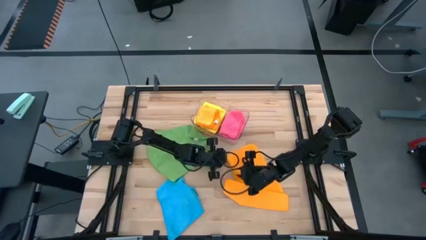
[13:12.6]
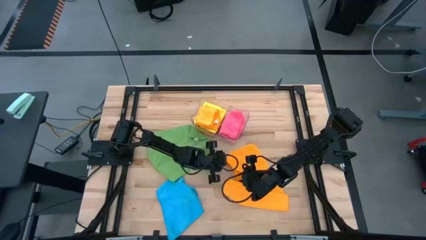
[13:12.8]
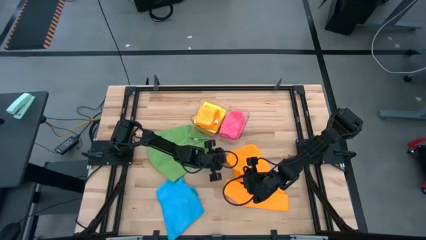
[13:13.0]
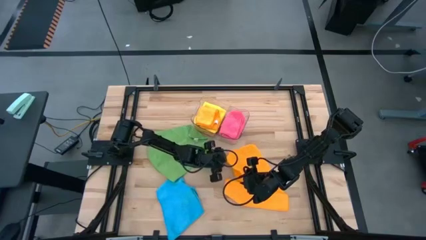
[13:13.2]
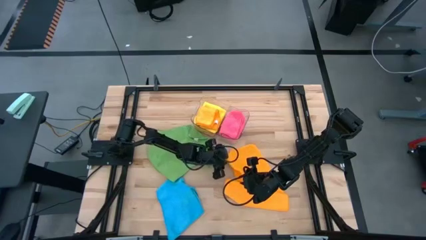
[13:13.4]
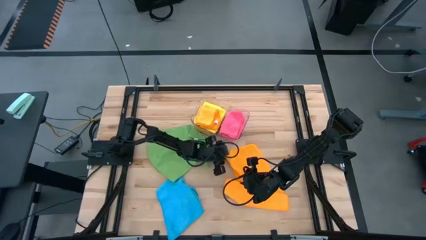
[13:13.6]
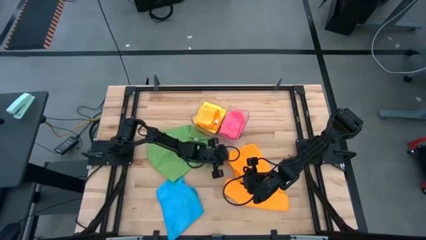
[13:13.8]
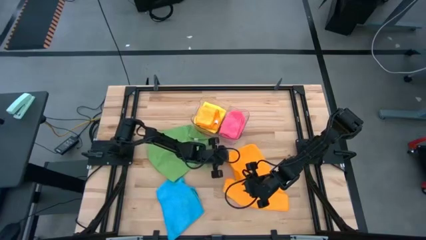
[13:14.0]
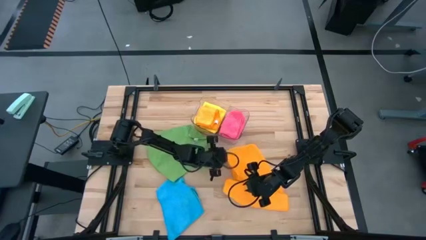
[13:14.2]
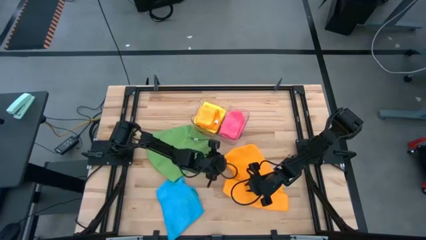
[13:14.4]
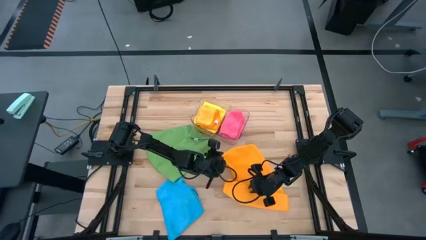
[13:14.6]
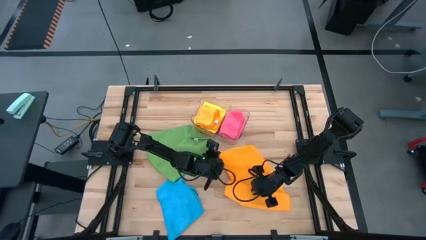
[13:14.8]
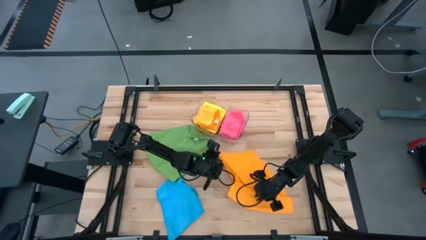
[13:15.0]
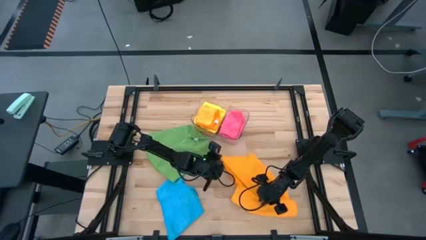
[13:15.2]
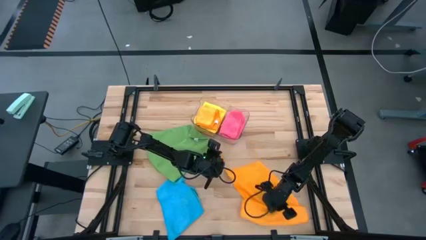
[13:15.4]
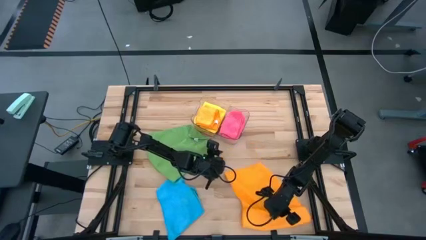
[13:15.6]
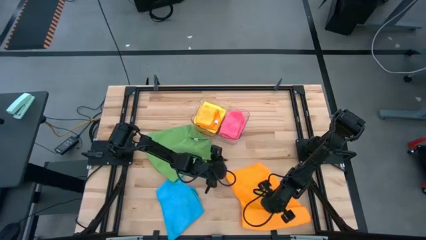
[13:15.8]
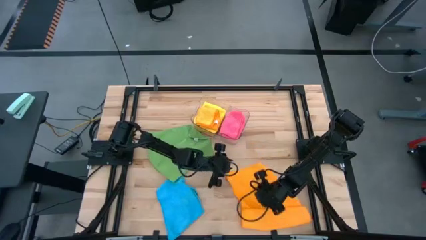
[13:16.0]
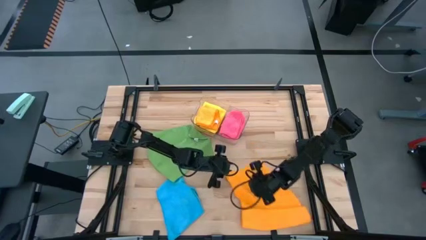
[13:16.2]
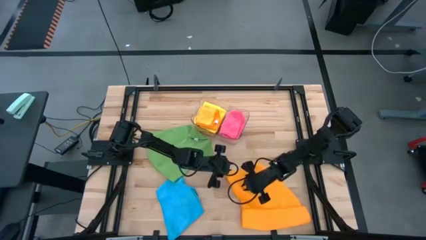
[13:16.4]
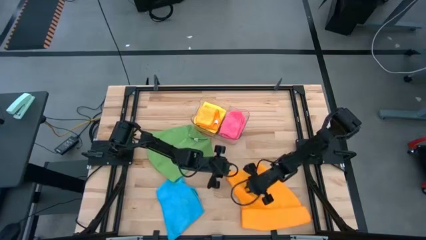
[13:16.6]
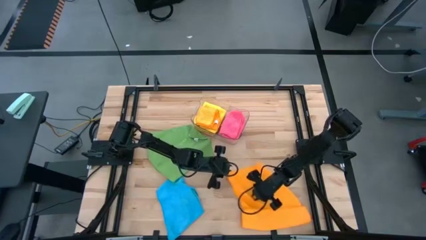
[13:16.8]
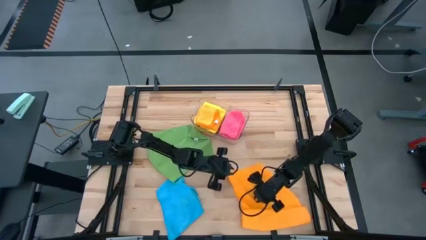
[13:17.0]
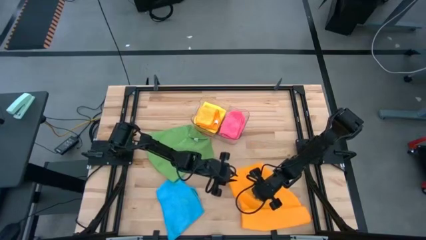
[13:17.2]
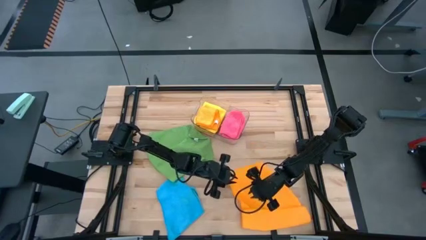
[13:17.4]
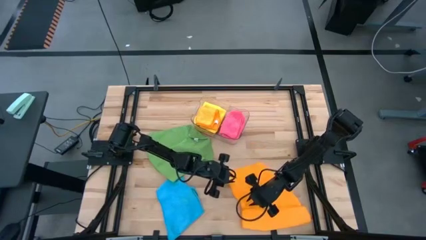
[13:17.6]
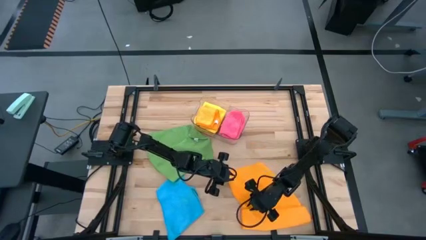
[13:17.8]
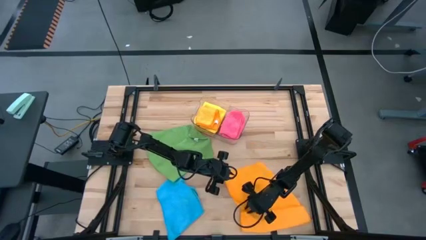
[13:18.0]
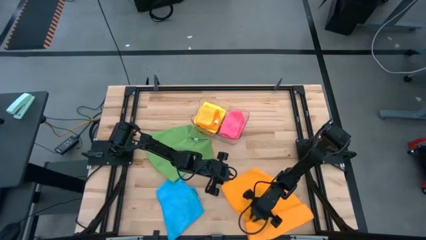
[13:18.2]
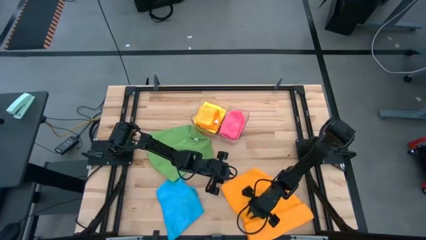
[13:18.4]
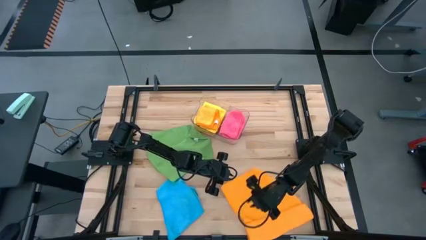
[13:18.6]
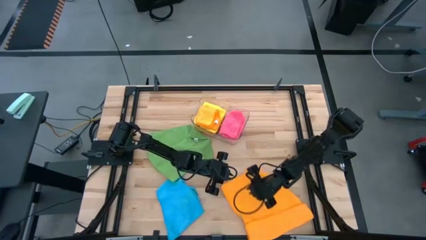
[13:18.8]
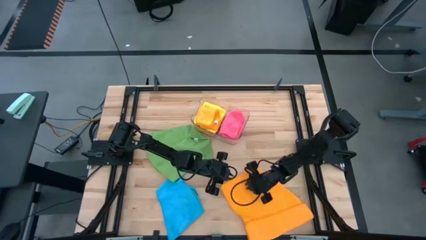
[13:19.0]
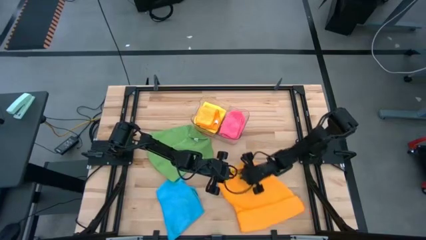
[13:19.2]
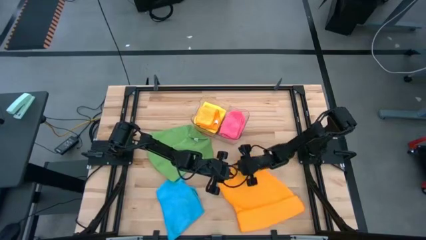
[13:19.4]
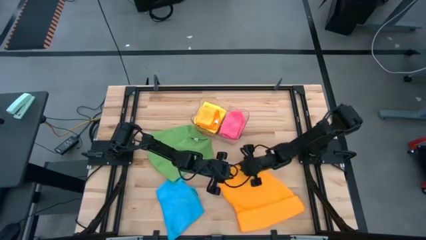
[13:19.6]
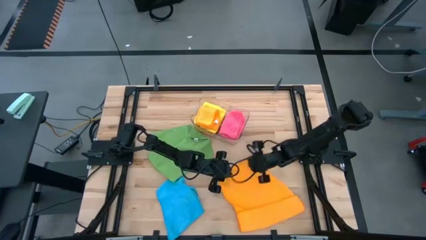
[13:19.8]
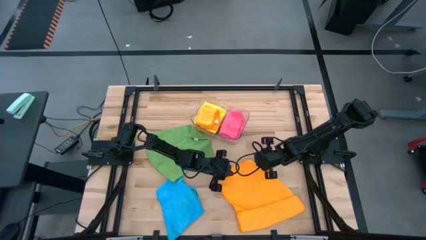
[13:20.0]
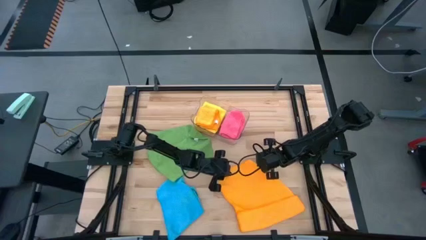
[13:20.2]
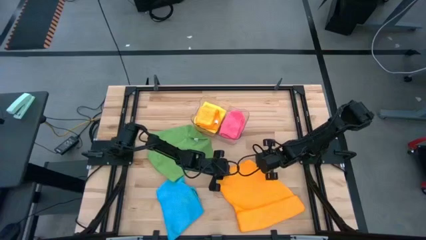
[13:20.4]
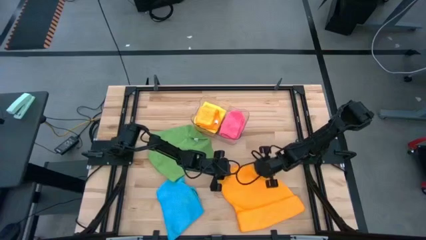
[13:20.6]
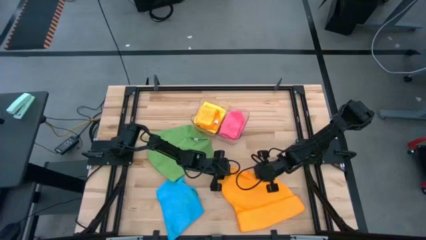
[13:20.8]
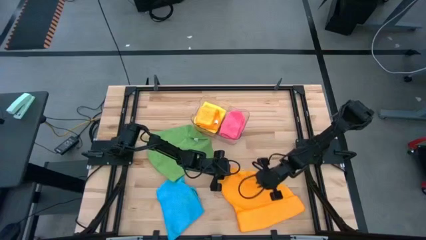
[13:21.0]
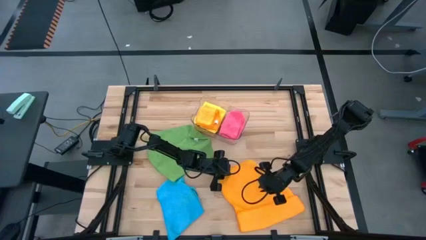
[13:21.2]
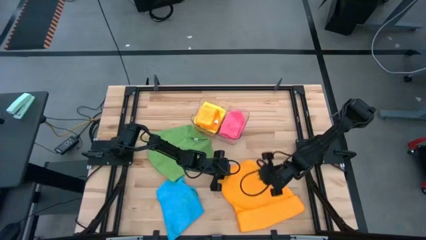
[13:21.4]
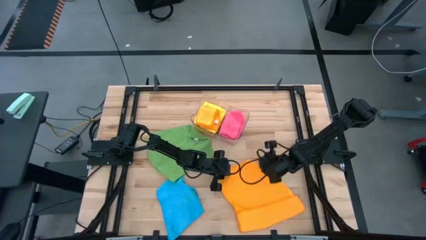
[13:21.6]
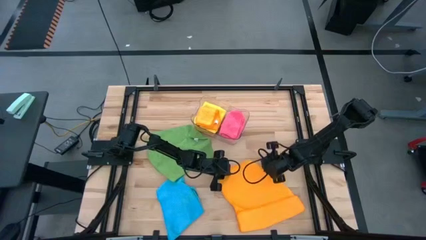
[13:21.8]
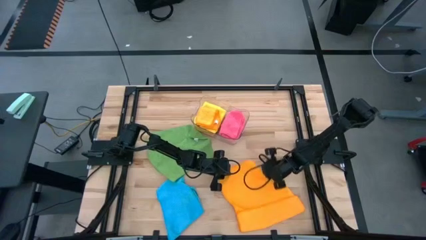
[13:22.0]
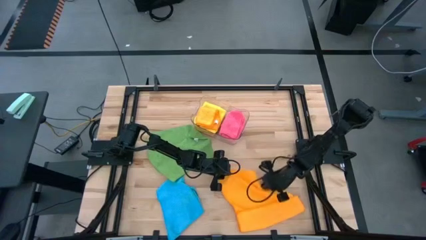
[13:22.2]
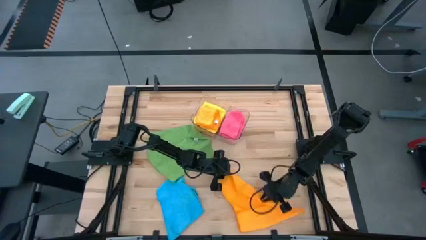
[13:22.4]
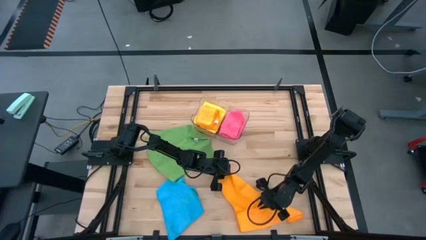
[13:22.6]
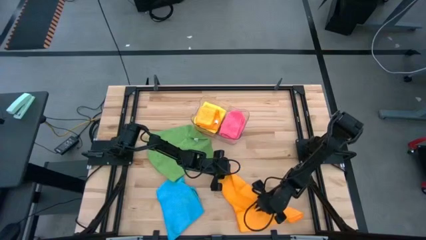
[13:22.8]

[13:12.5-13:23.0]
Task: Fold microfiber towels
Fold the orange microfiber cloth

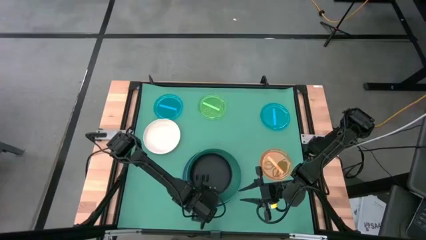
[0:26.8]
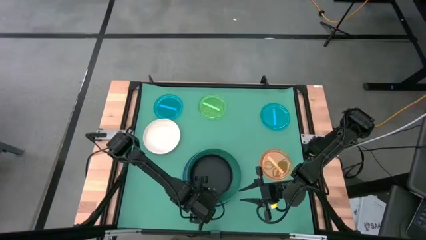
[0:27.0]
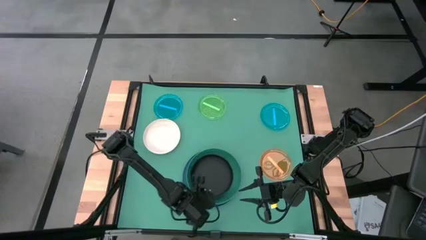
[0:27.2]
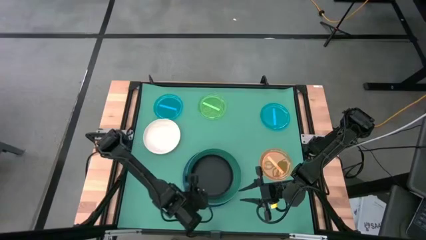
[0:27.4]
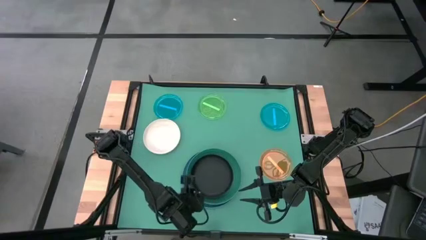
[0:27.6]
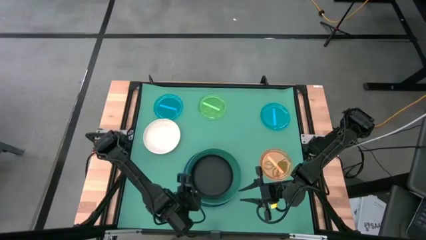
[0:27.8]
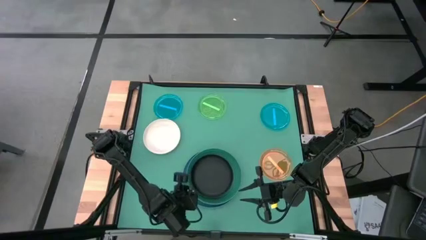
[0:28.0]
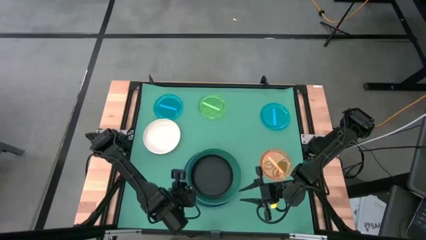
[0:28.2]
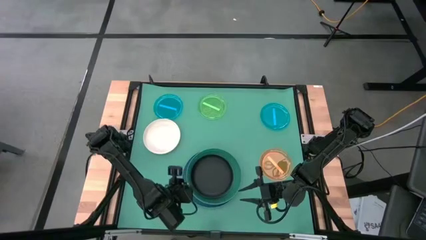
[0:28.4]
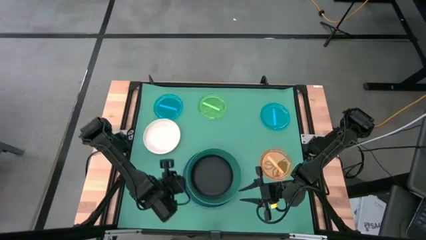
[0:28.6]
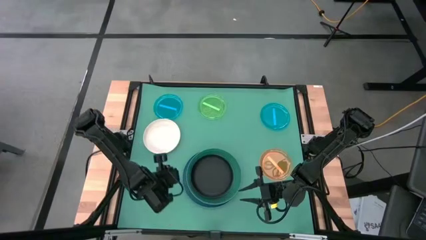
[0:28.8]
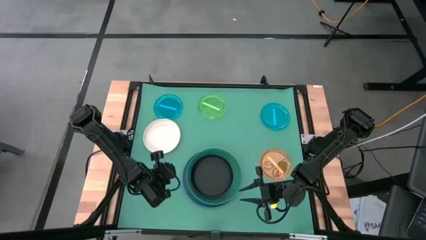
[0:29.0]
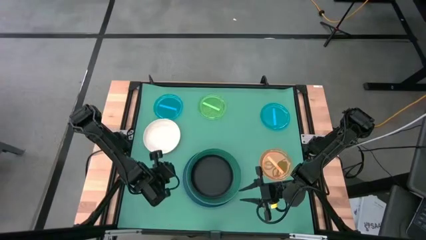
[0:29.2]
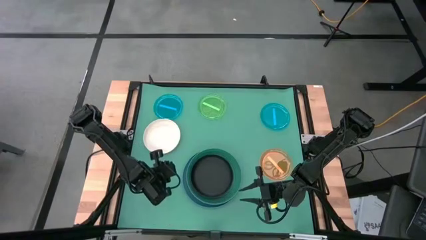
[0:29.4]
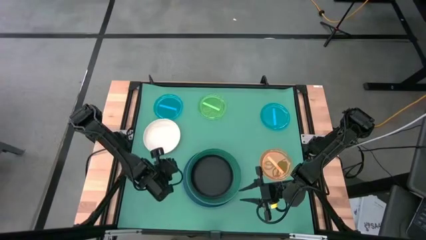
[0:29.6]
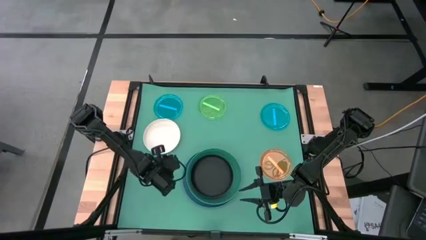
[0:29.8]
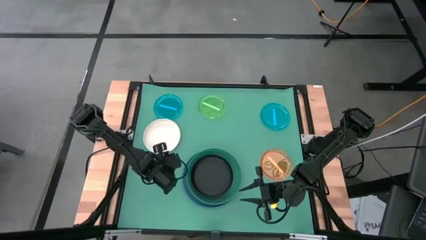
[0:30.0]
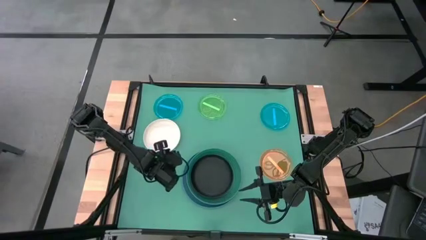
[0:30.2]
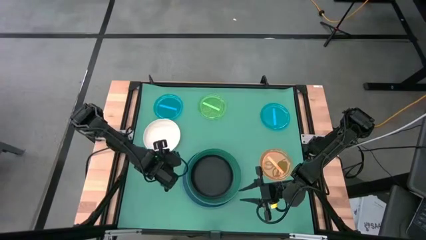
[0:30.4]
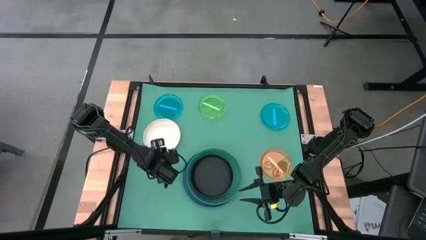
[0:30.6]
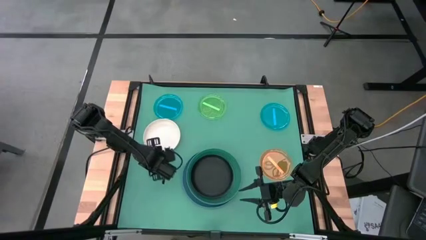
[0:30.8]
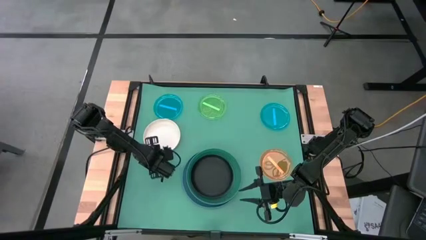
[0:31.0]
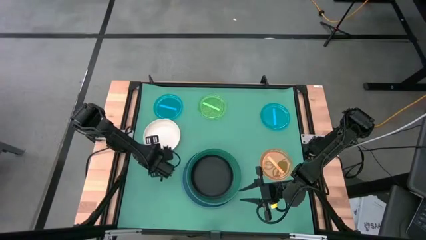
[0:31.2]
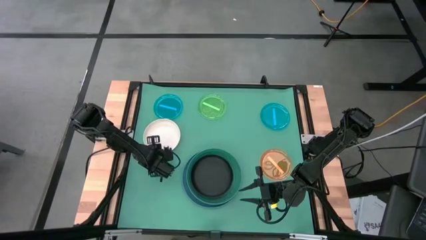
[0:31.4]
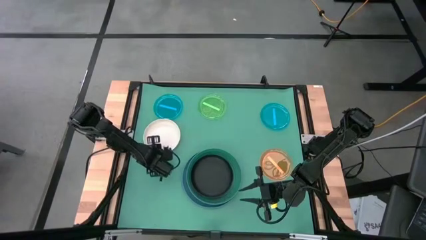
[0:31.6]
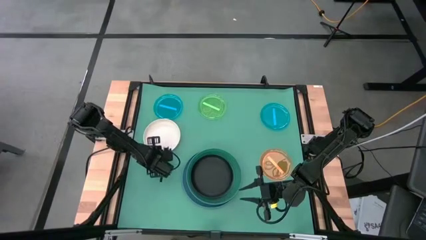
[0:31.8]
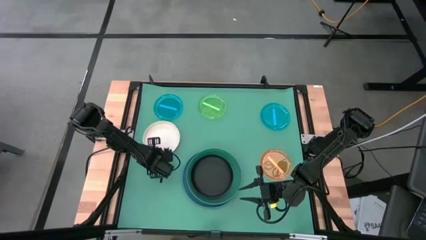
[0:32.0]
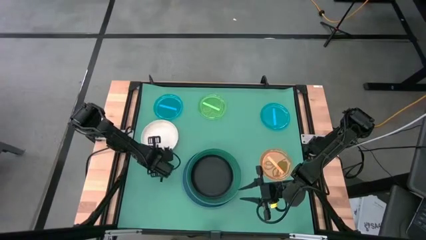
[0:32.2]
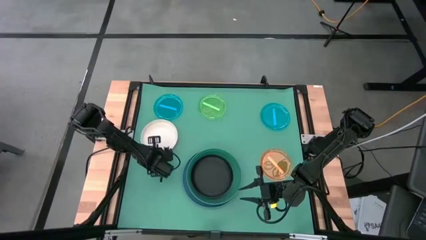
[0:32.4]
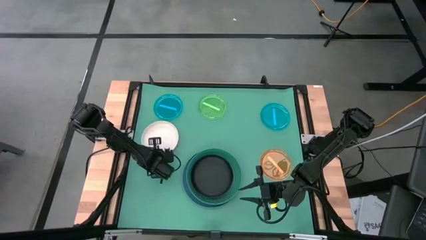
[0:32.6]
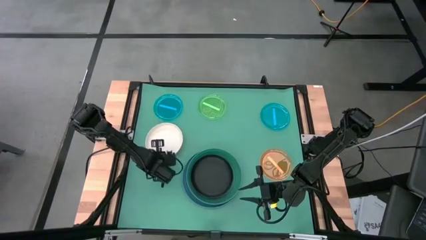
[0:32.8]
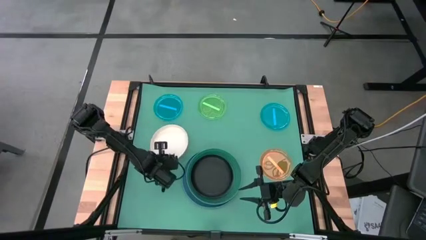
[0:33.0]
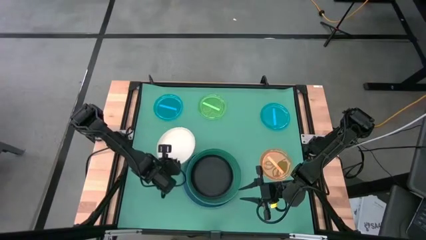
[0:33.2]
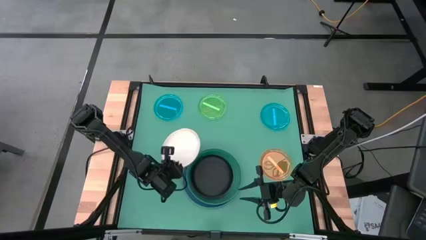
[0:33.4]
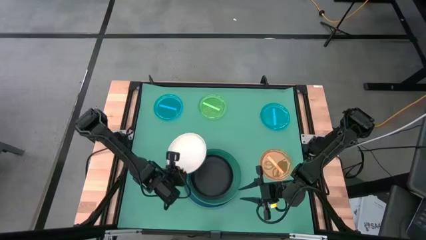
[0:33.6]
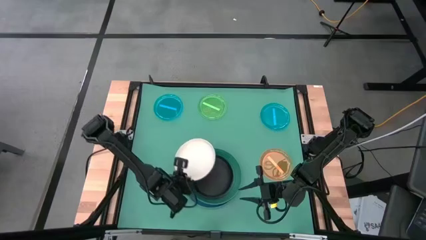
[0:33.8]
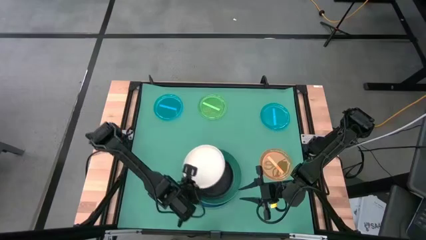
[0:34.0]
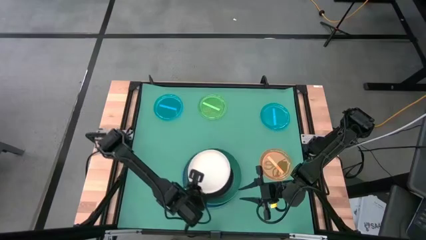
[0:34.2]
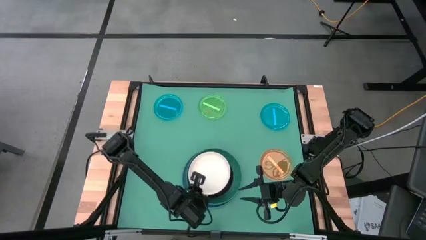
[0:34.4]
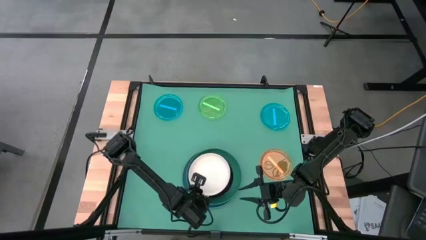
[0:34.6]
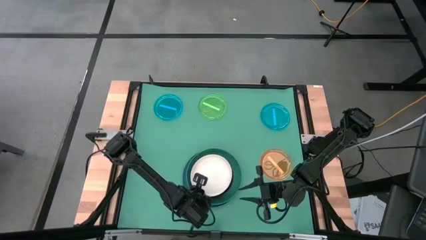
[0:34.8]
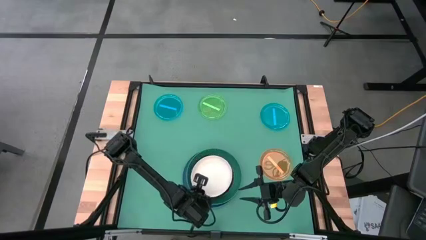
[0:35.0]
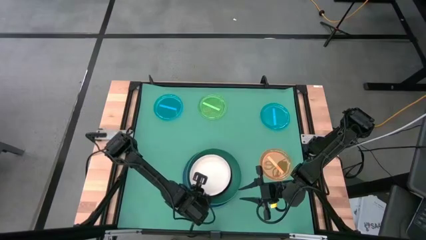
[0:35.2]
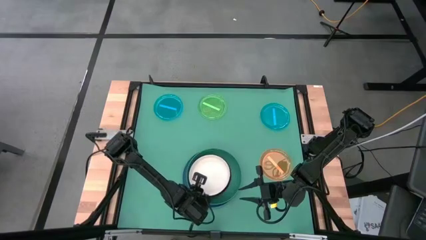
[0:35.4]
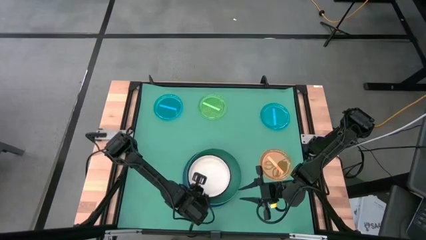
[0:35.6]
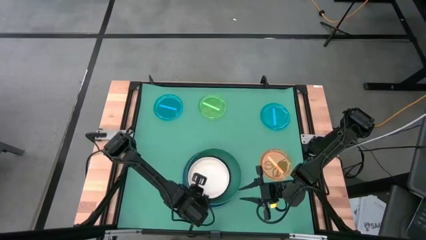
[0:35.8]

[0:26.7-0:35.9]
Task: Stack plastic plates
Stack the white plate on top of the black plate
